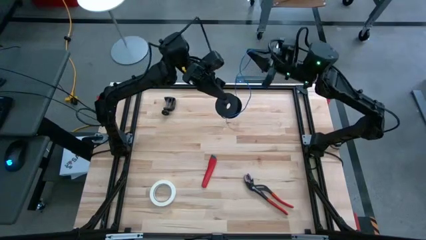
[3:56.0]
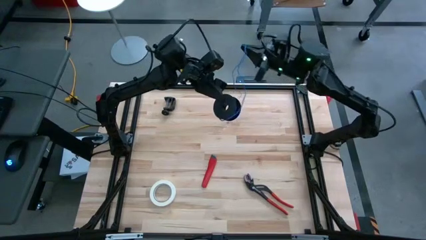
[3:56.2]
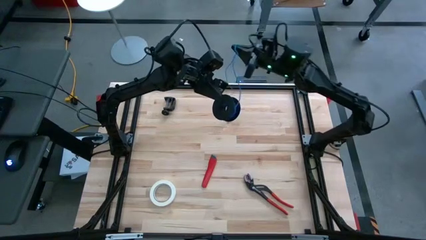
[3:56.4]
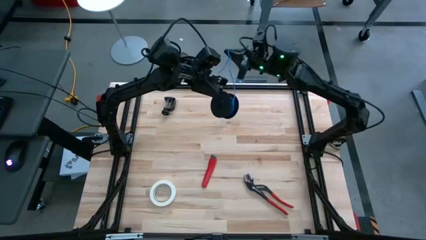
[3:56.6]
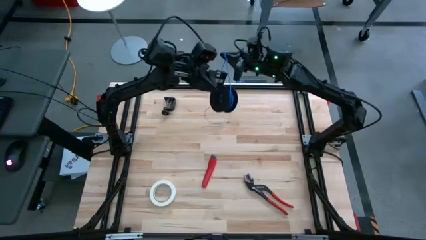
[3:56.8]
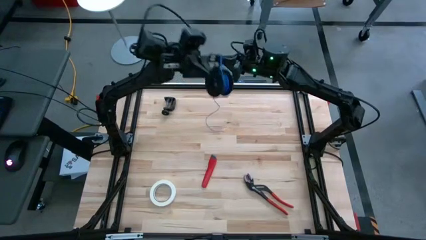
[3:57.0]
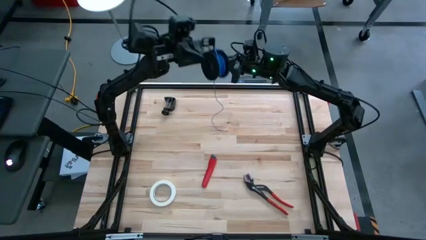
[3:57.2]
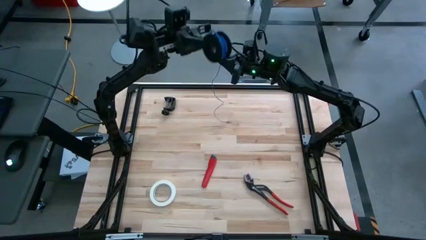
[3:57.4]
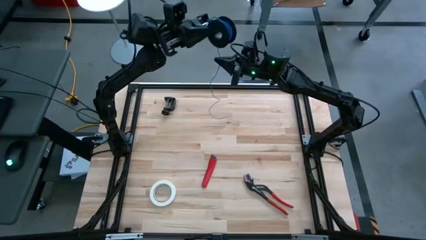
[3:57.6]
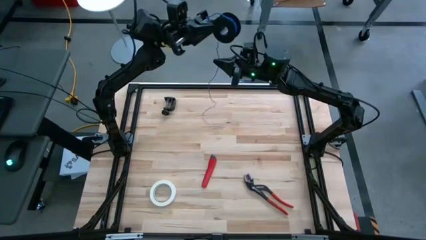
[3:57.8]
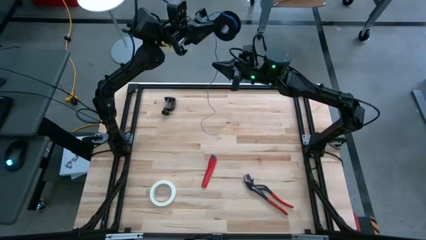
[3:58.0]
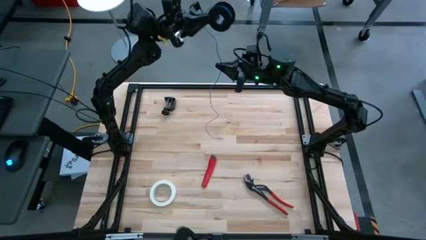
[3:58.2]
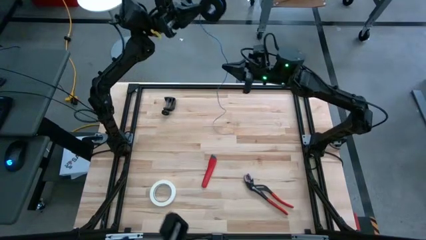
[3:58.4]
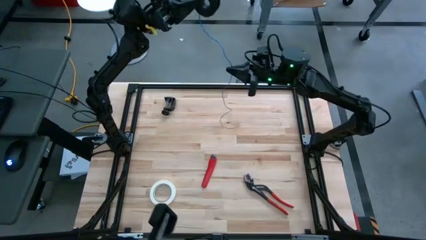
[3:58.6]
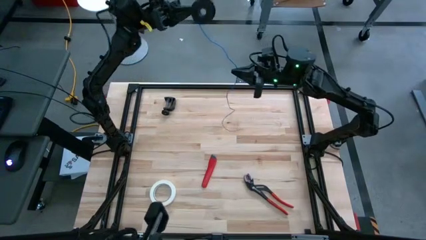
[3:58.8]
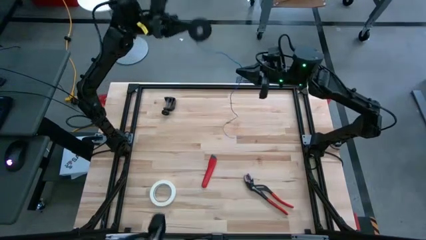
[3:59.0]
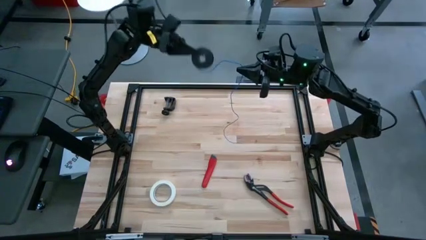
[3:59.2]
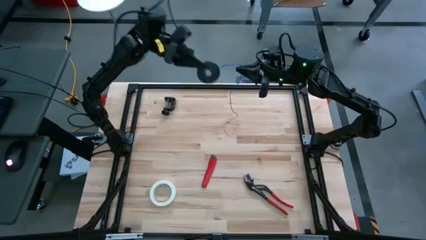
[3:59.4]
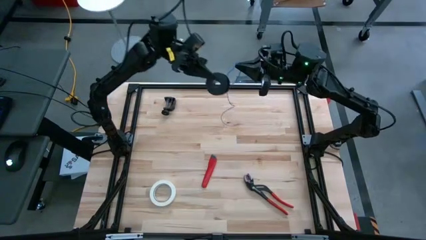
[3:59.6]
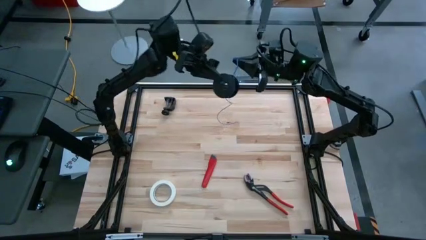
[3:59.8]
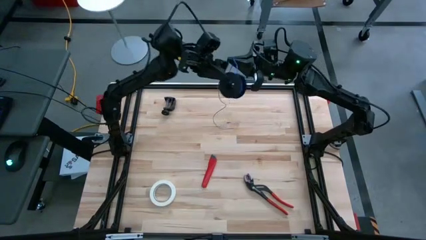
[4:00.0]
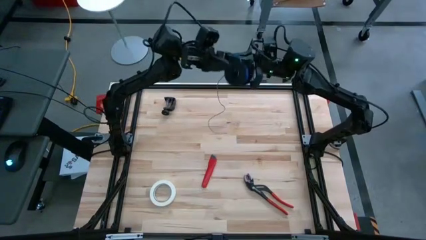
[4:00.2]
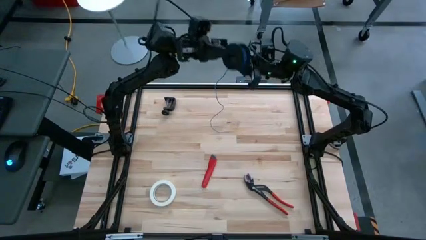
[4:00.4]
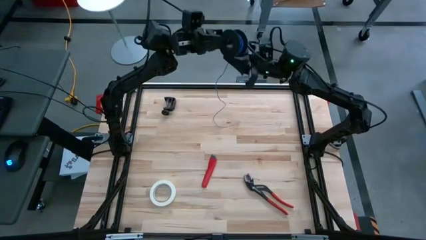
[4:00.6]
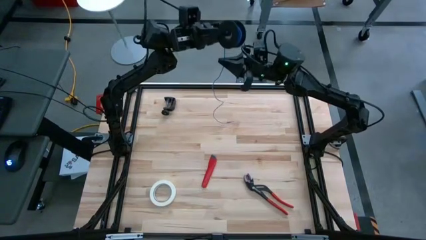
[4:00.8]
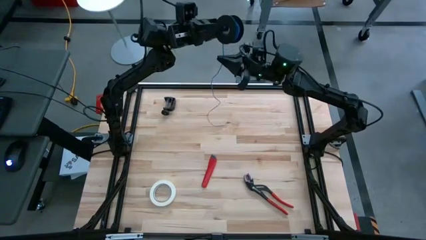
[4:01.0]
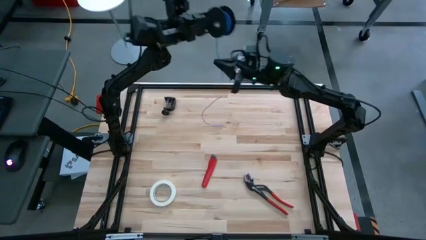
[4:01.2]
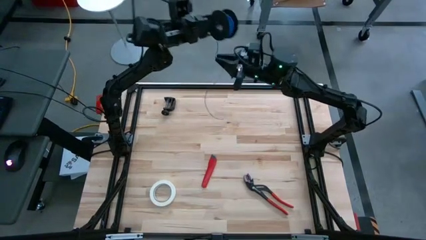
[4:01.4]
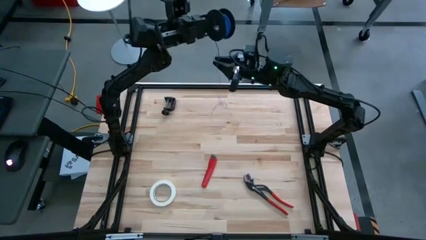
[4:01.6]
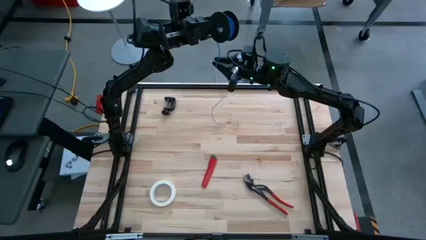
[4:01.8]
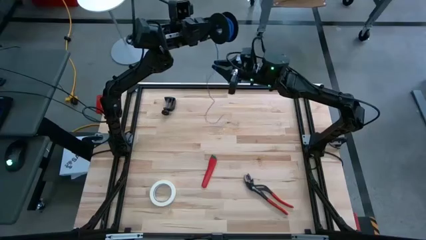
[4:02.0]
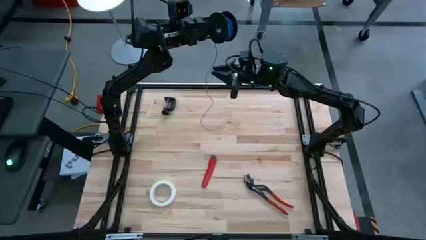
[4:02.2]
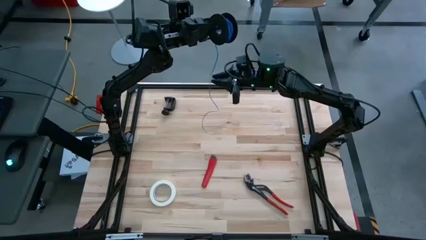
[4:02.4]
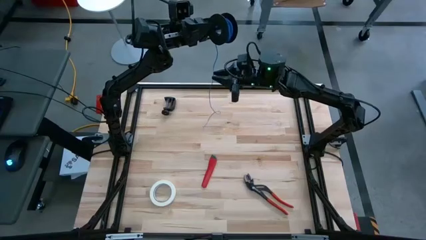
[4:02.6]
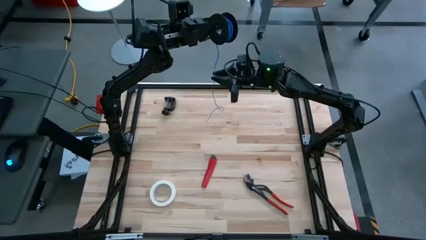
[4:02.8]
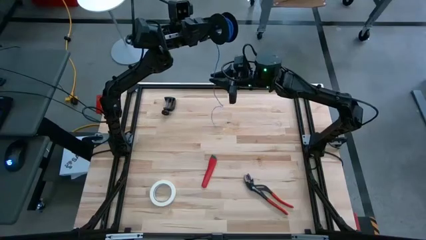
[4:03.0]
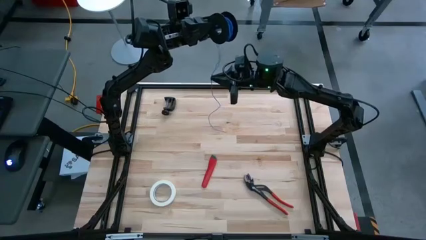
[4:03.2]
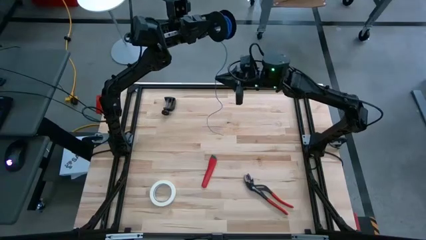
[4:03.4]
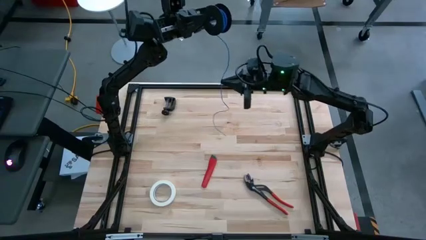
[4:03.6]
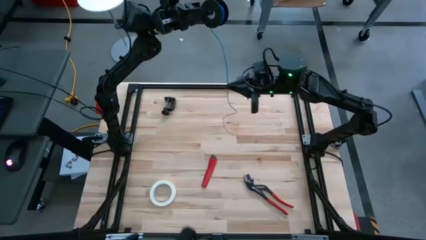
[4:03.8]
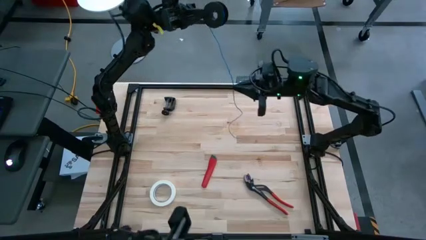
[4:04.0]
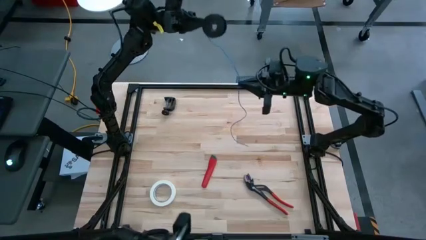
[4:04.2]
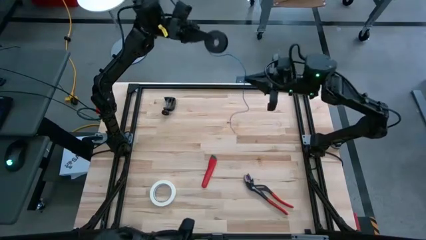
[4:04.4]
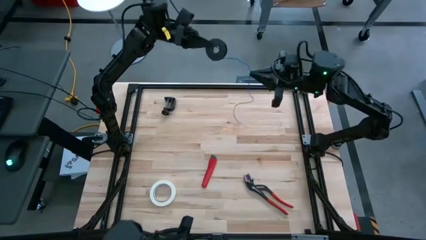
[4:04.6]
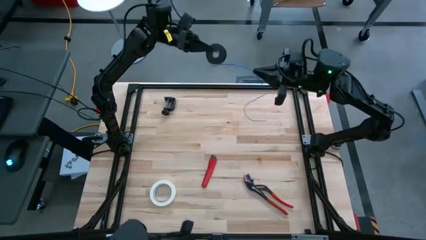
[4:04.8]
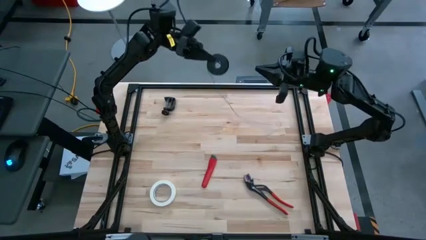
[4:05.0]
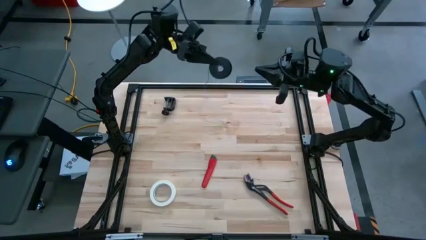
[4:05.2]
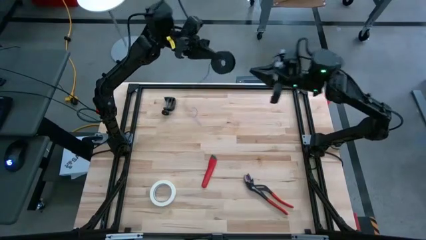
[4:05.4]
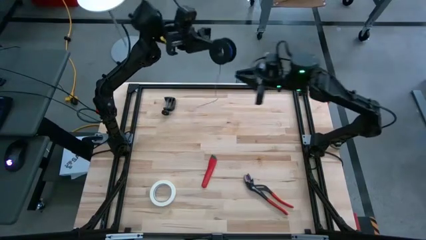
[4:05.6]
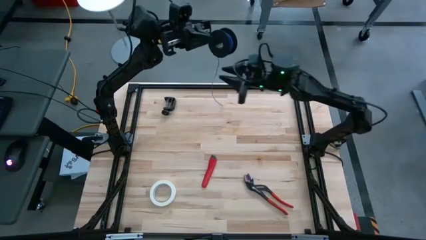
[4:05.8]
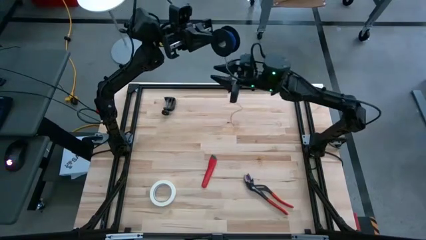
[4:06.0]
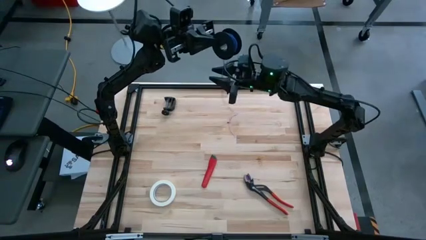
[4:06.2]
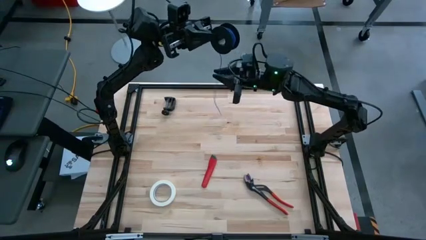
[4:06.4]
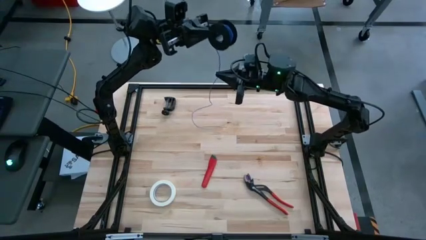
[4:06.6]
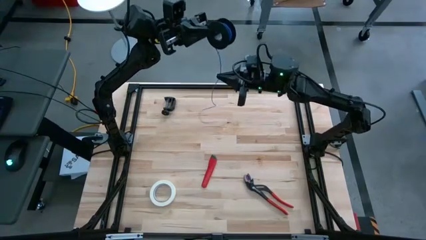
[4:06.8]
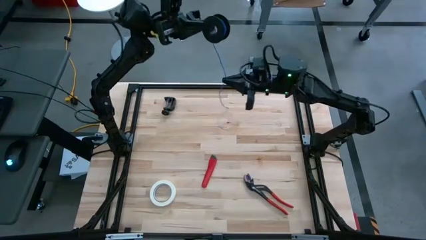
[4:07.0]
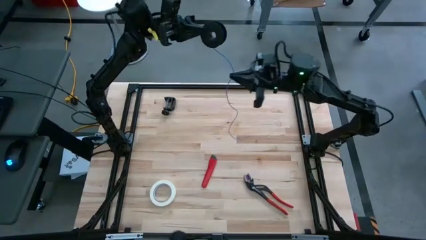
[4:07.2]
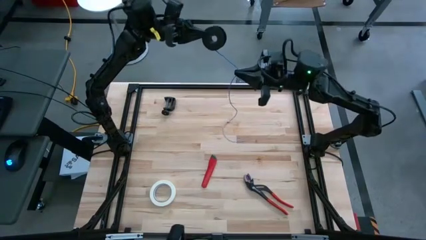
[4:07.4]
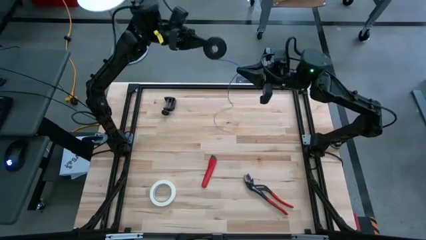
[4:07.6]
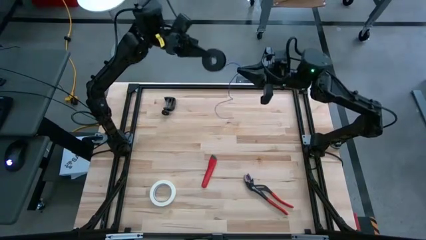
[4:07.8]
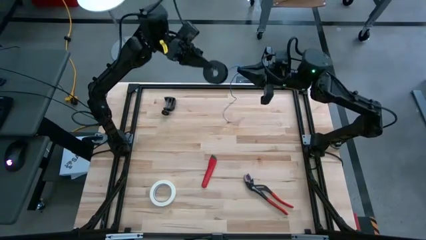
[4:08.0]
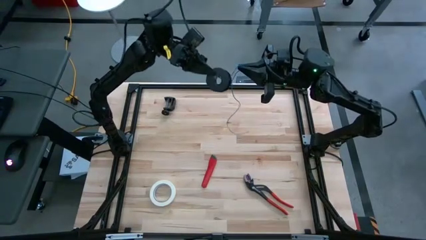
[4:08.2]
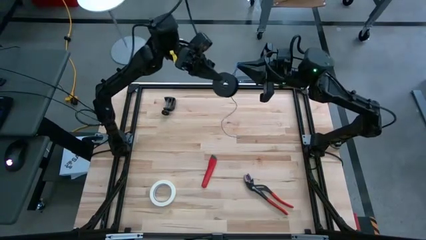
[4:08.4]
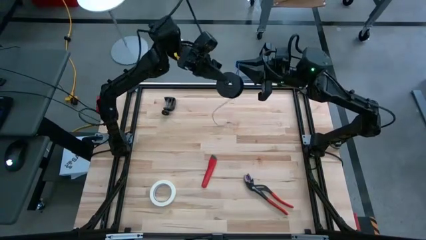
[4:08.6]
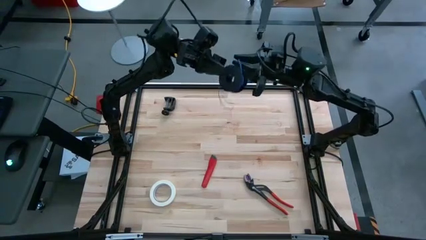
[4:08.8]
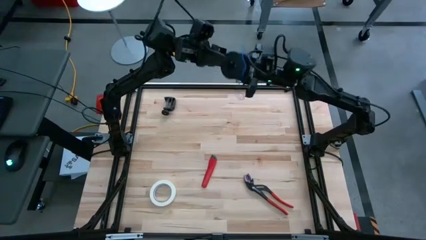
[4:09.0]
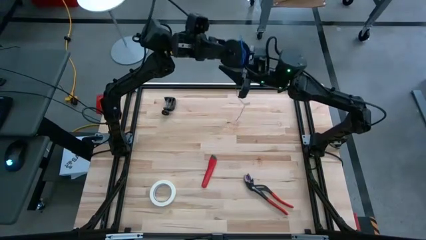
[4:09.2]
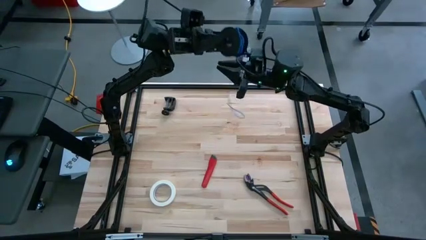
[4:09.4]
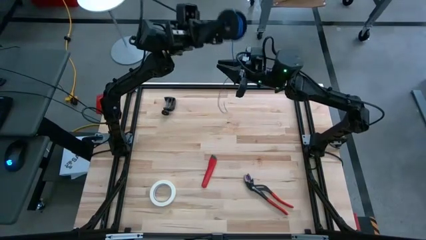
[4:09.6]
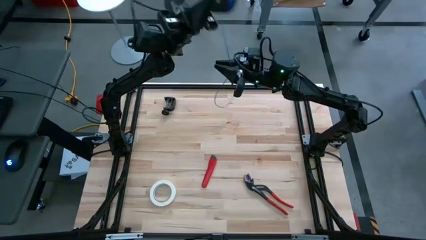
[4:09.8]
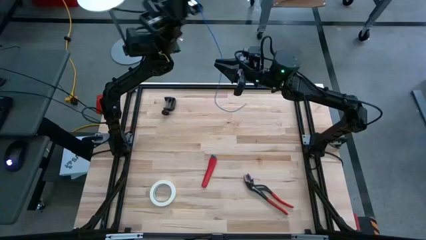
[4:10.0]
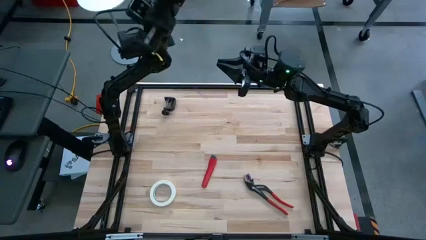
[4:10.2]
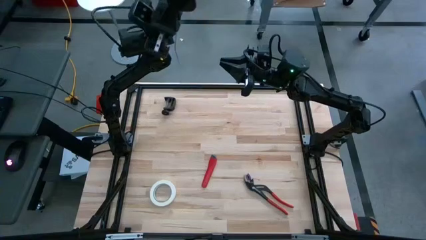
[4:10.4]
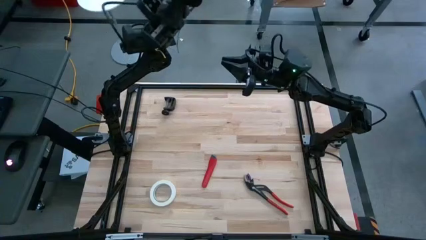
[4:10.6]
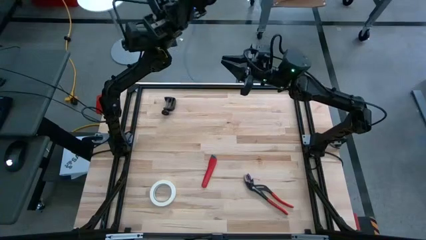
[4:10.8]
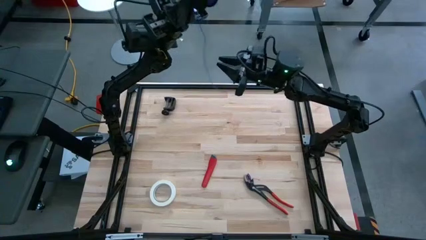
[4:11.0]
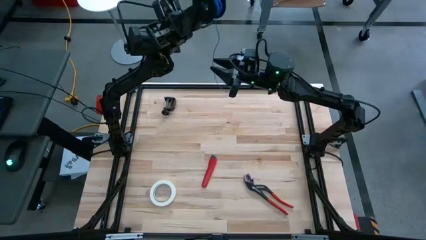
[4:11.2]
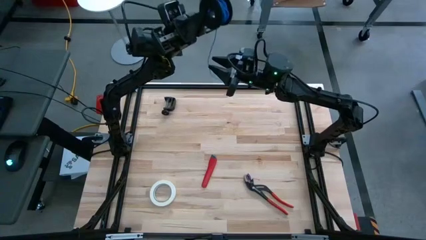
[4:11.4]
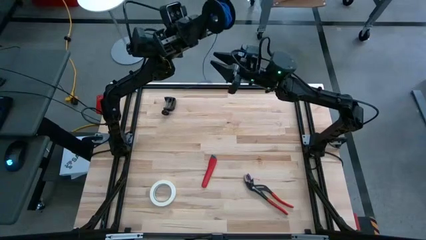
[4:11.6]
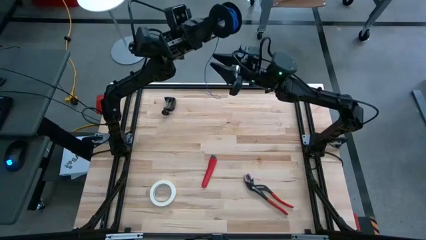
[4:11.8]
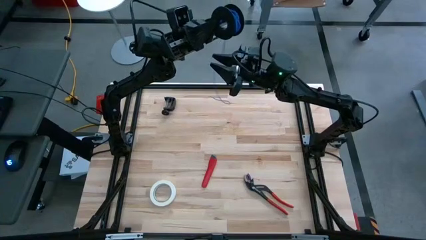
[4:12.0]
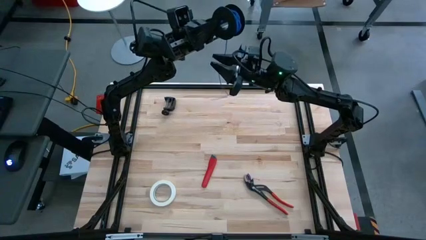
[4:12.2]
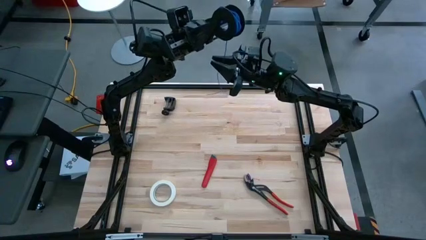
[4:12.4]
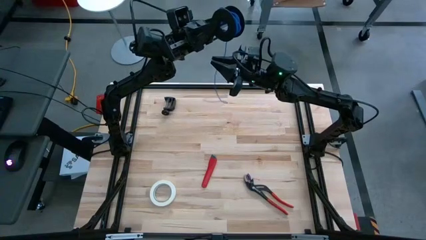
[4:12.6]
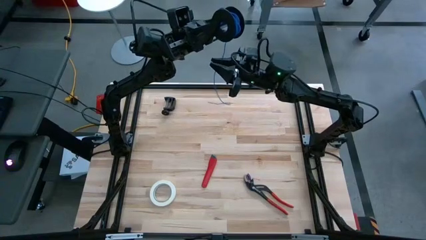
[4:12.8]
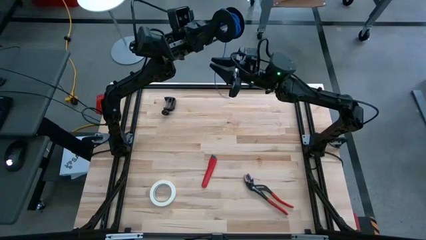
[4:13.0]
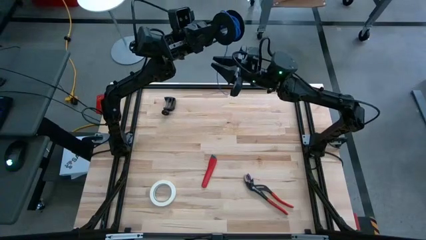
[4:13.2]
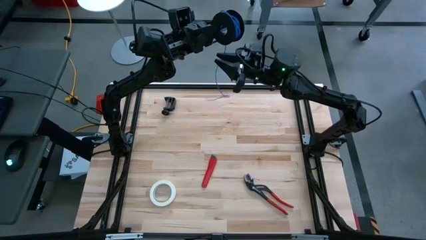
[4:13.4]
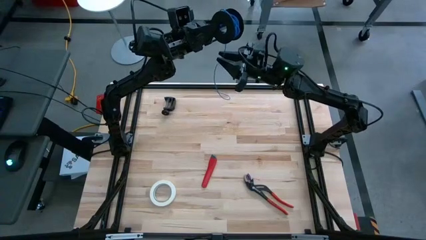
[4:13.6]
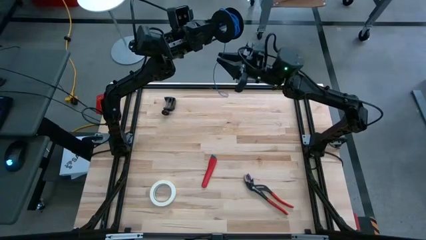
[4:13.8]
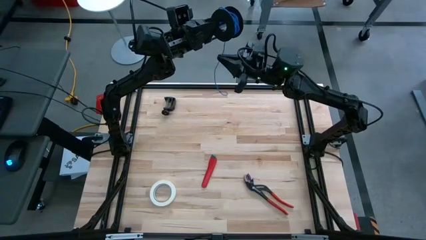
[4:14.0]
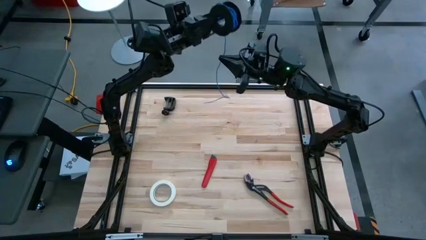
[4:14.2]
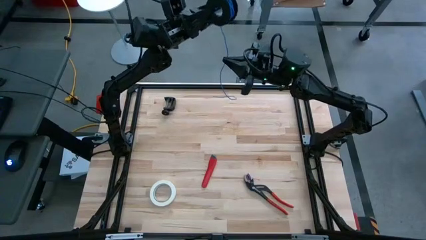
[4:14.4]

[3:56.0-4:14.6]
Task: Coil cords
Coil the blue wire cable onto the black spool
